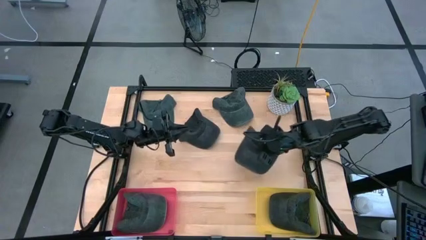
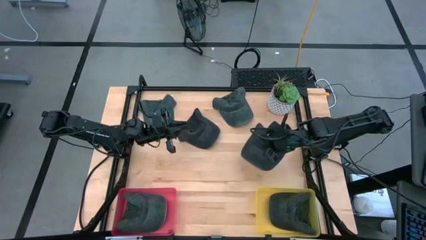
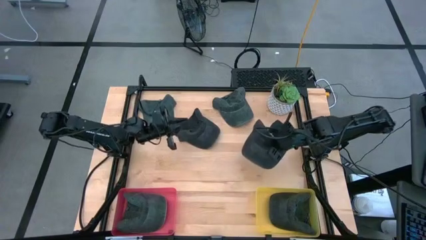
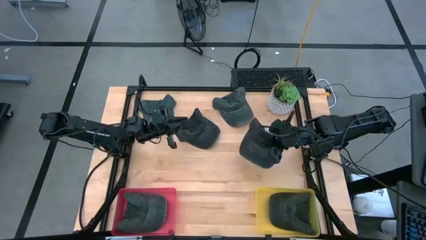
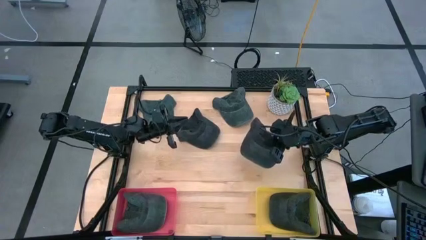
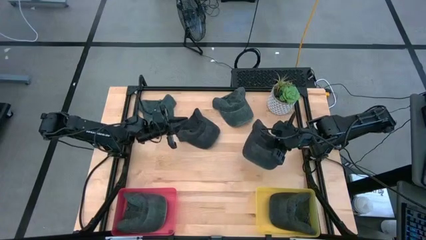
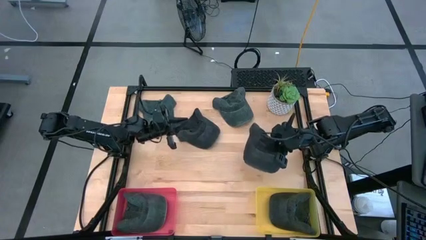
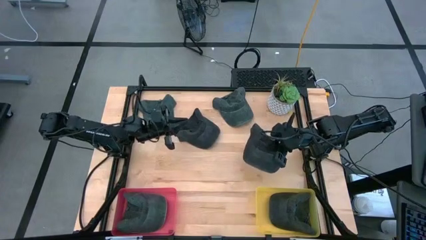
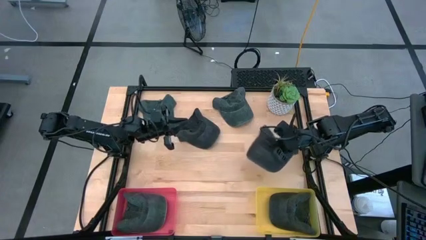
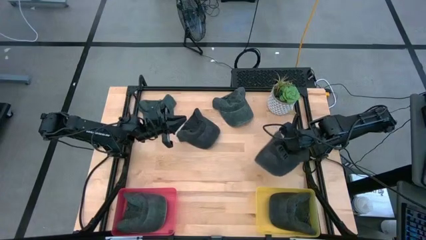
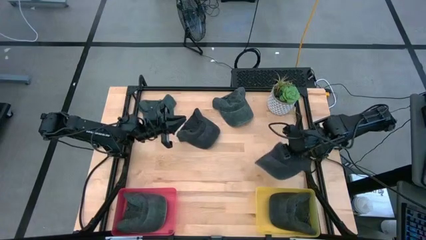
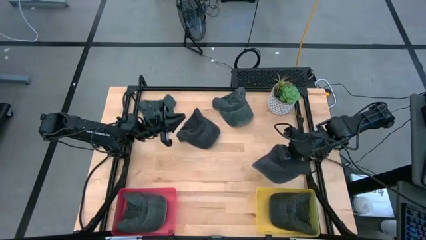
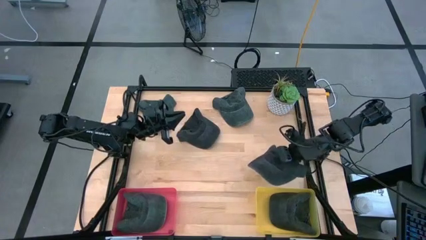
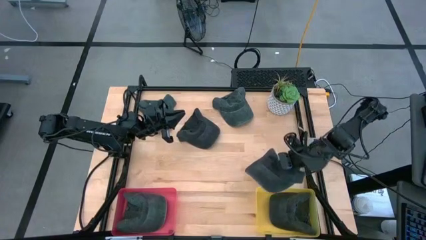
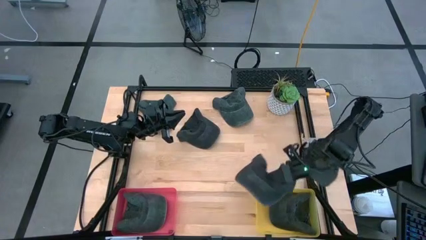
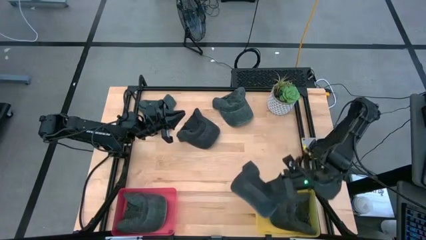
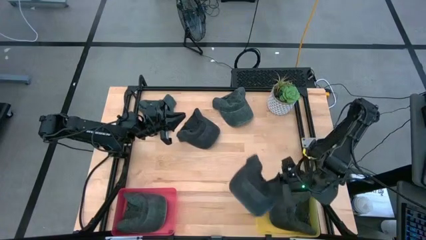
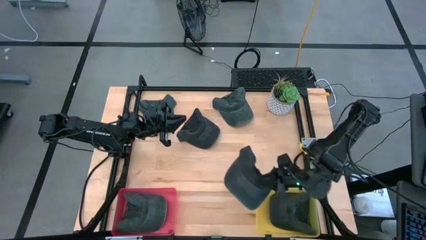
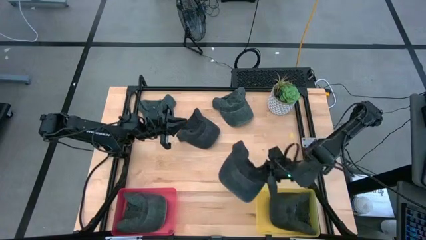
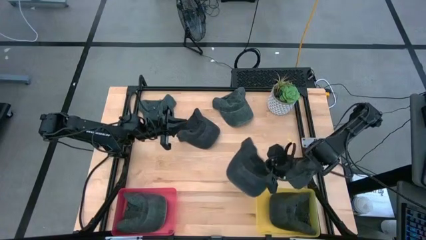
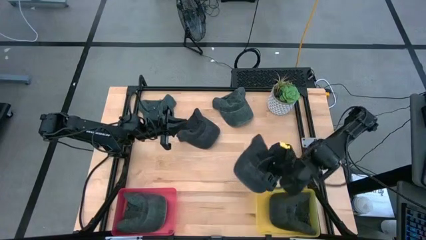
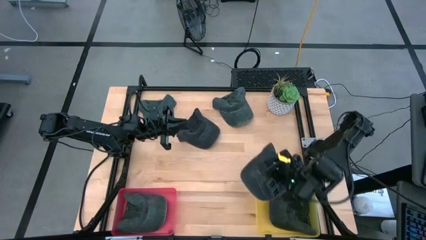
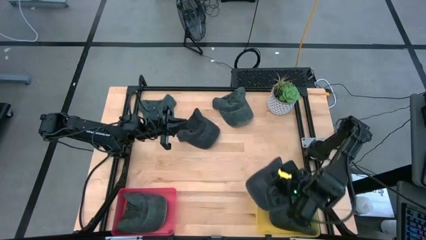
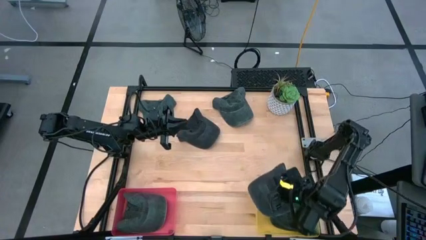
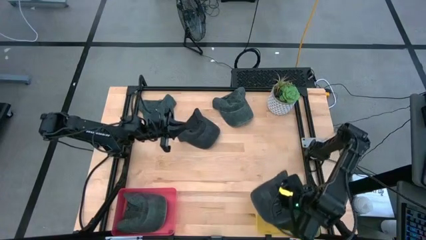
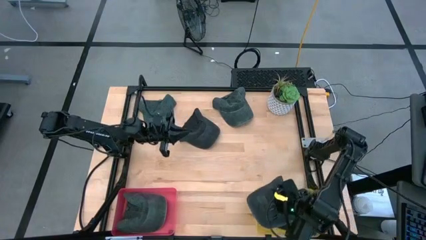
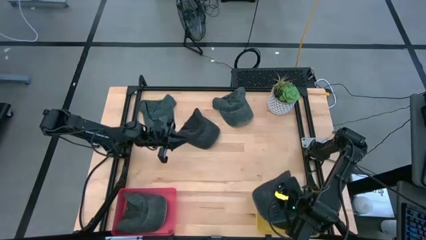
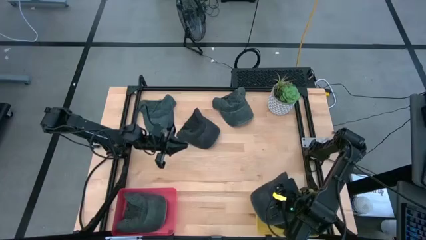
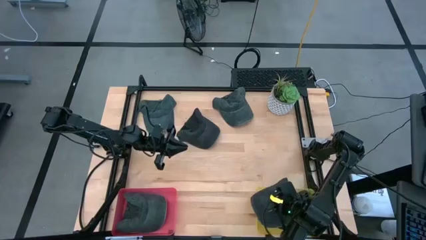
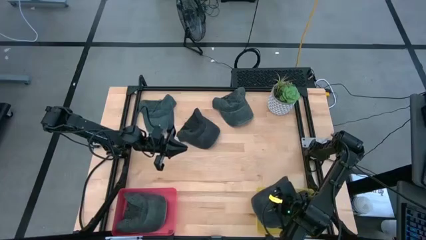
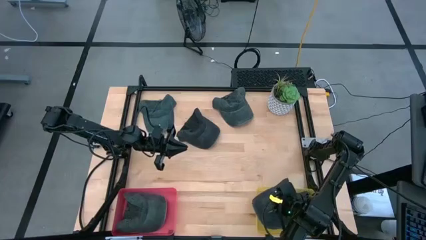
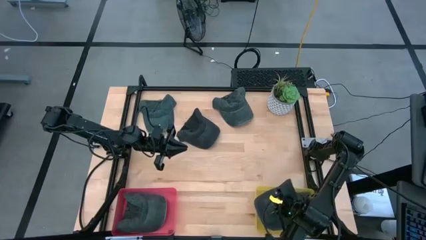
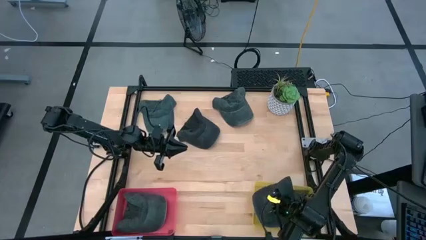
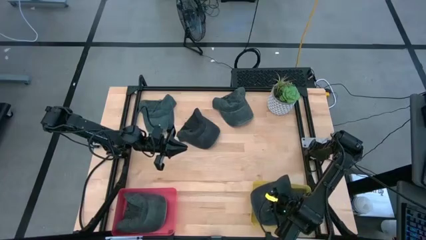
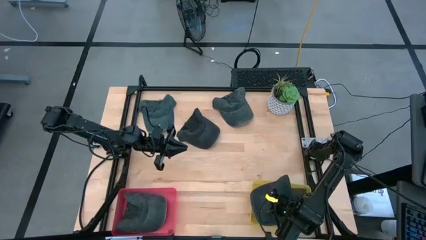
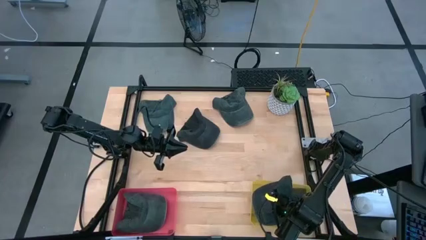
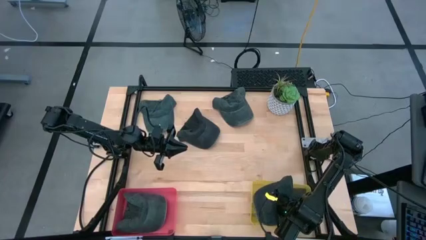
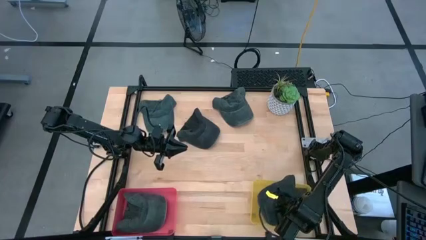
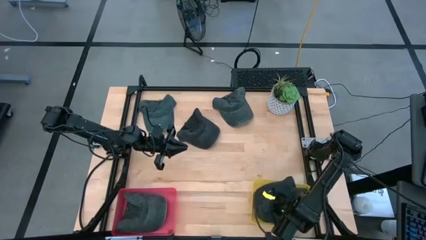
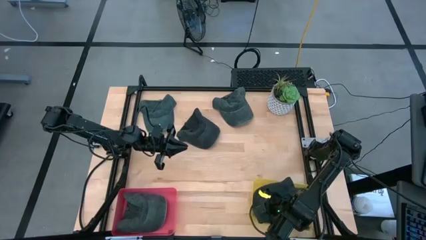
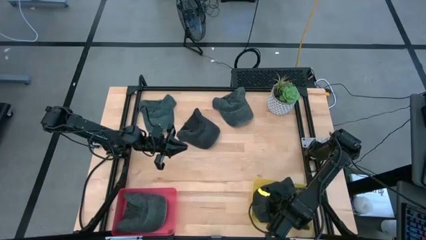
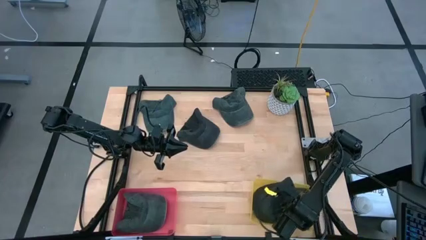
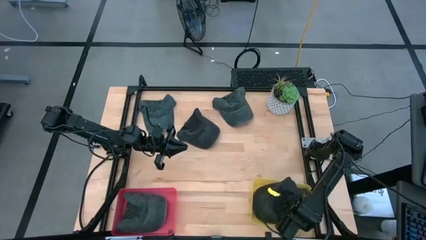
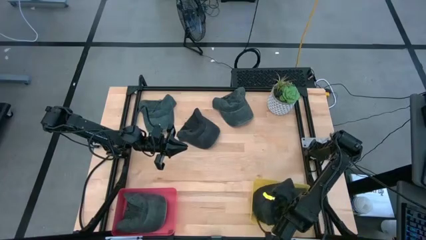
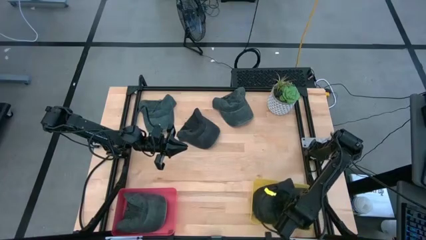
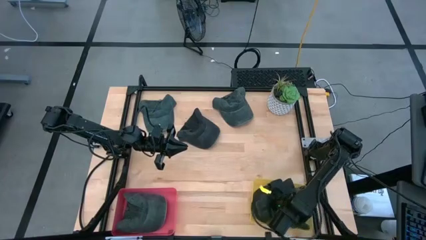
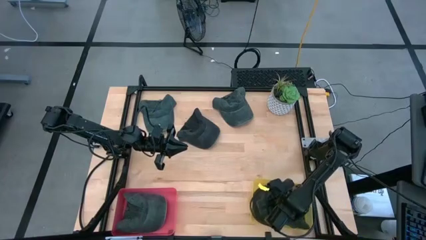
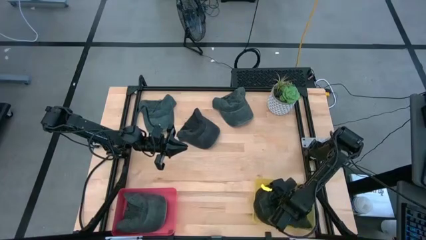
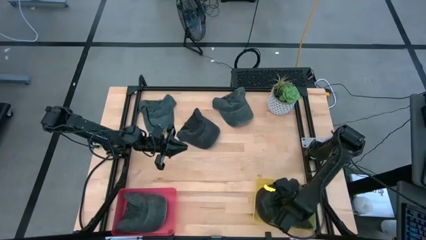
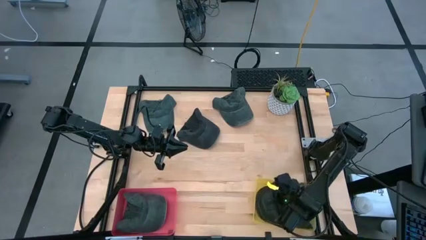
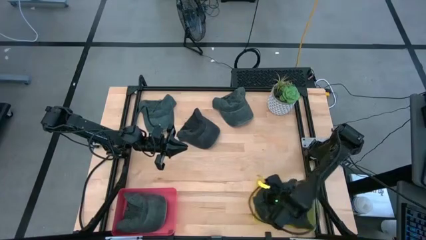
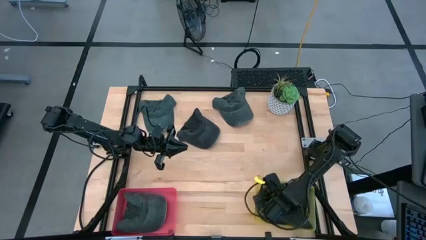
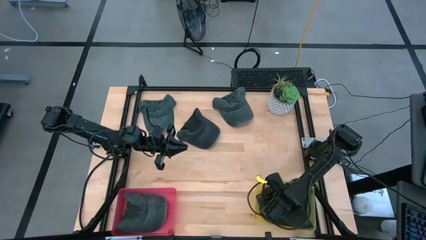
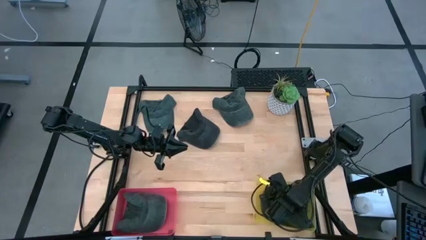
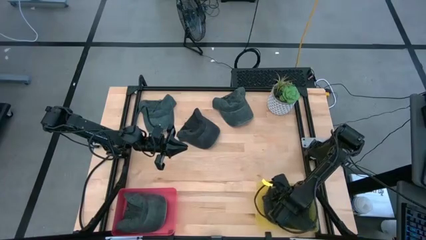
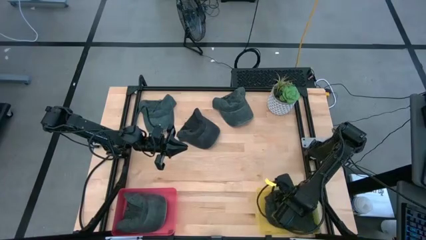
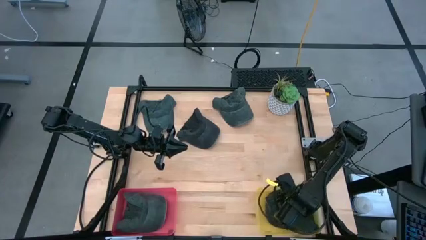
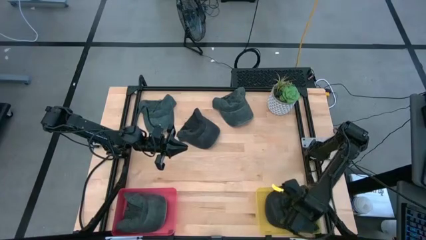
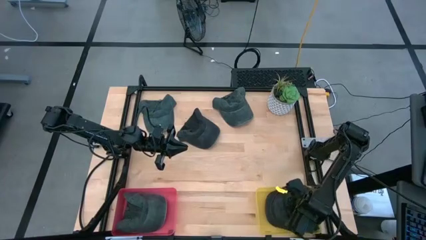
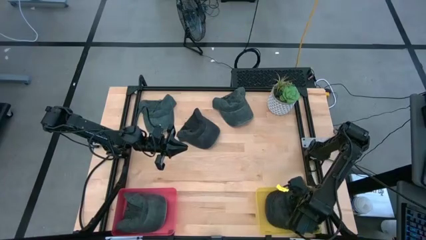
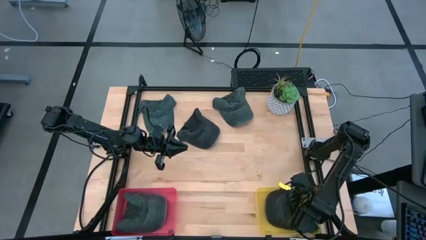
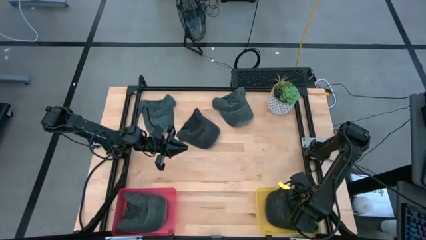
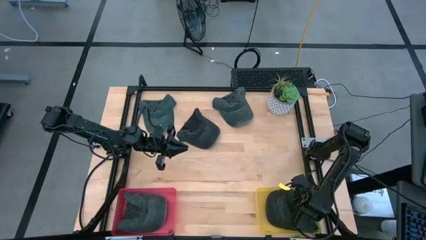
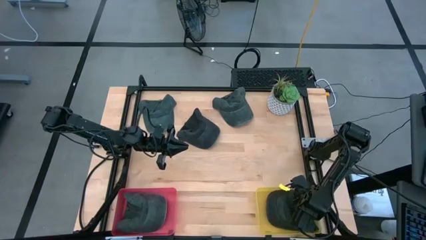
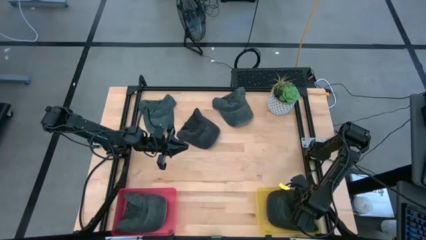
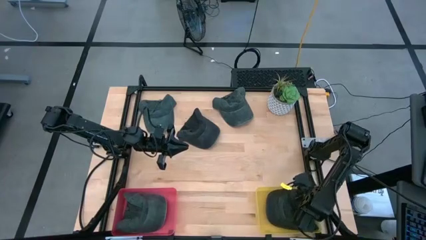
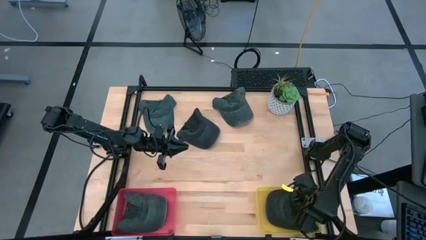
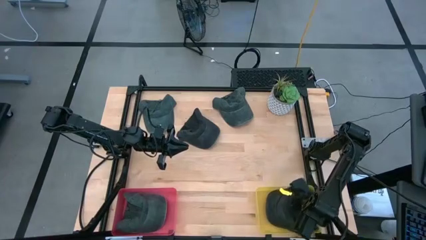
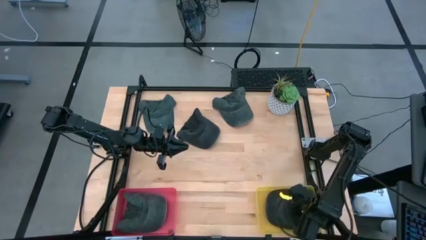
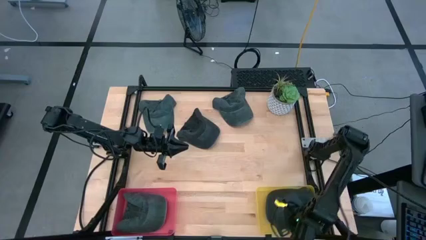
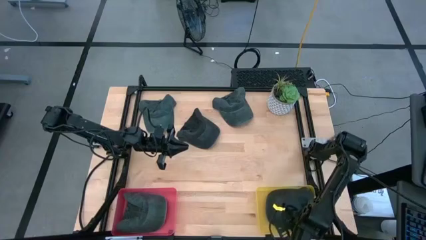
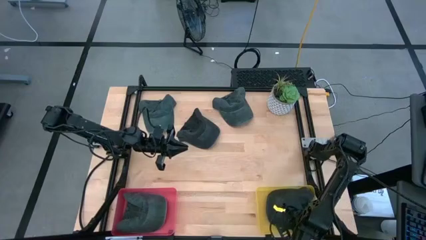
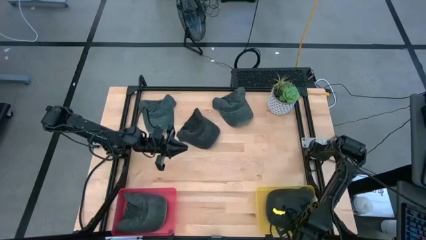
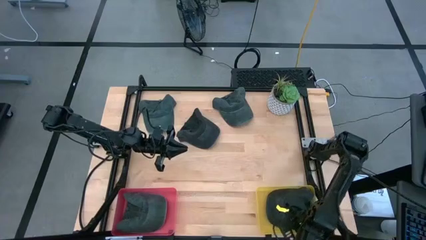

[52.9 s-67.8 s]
Task: Pick & Place hat
Put the black cap into the yellow bin

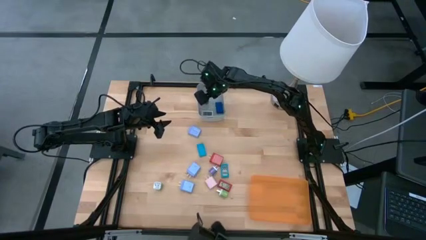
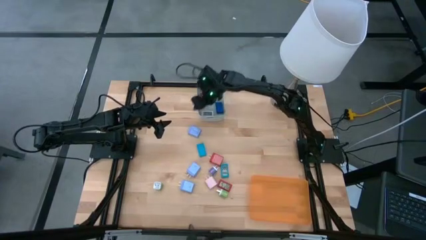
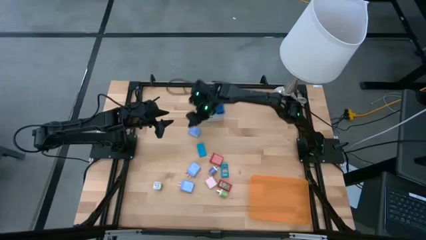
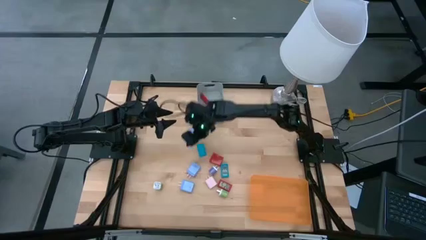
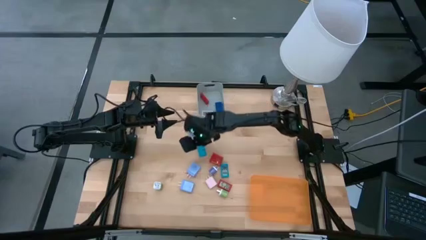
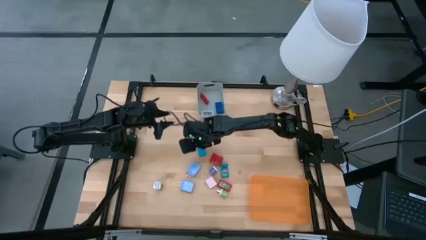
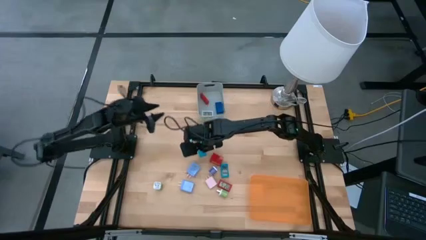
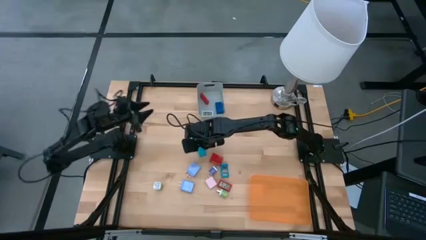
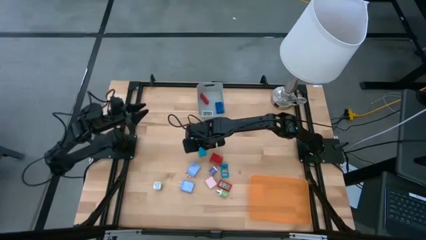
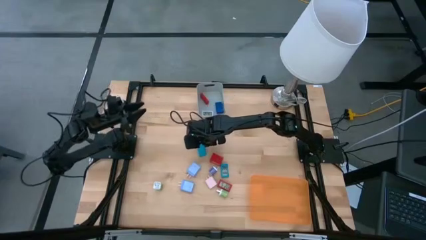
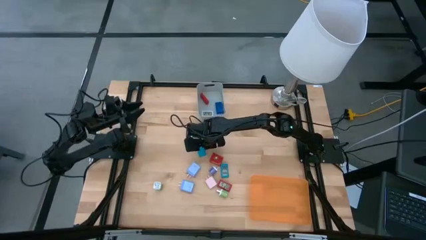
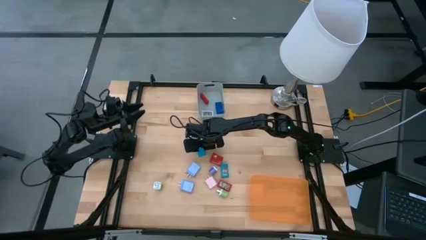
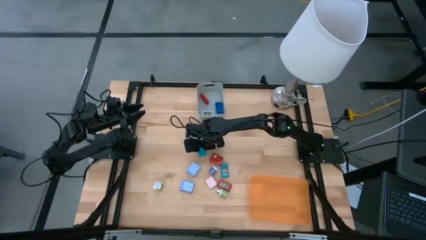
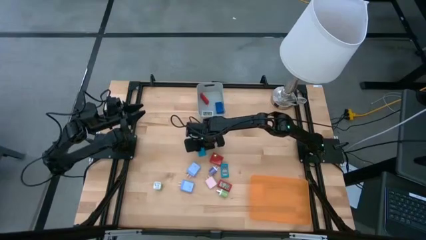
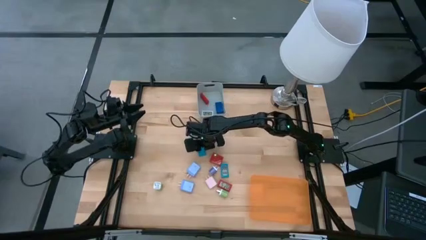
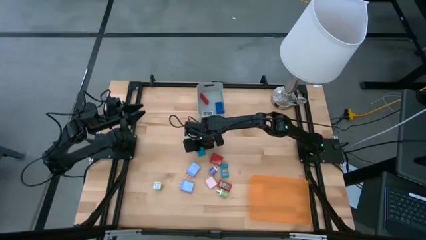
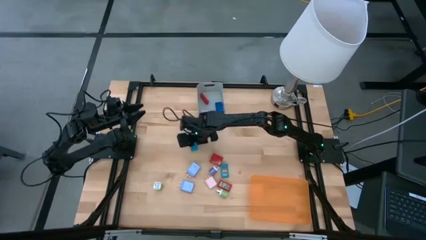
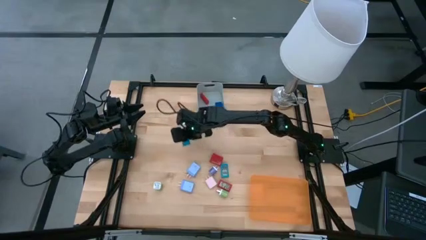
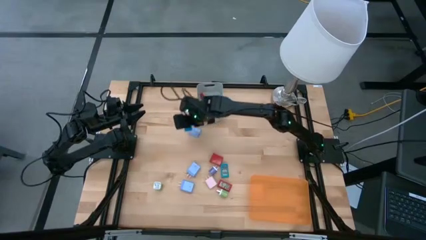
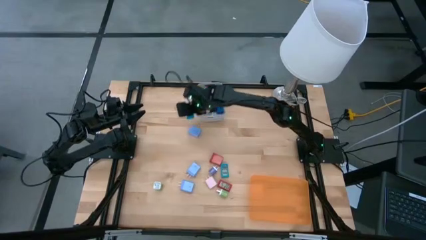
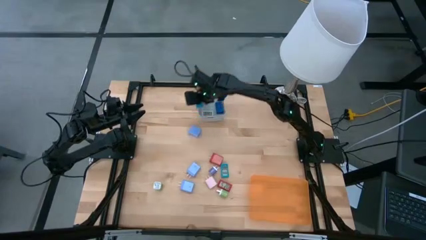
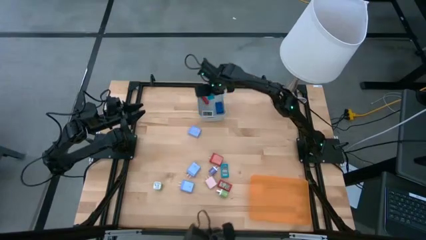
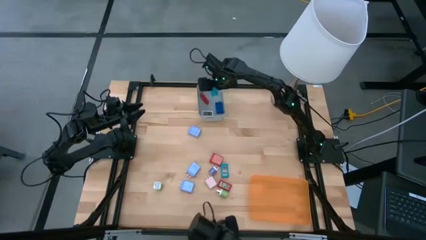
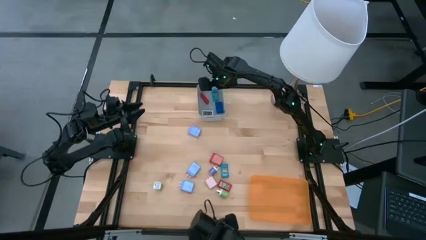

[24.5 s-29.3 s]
Task: Pick & Place Office items
Put the top blue digital timer into the gray bin
